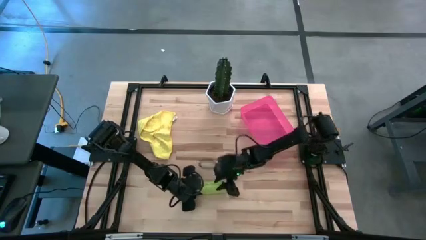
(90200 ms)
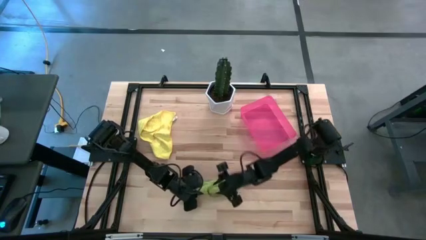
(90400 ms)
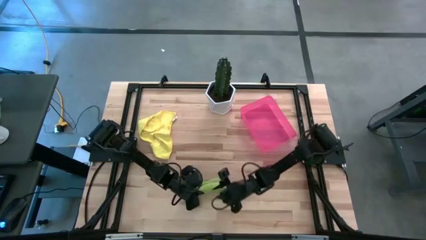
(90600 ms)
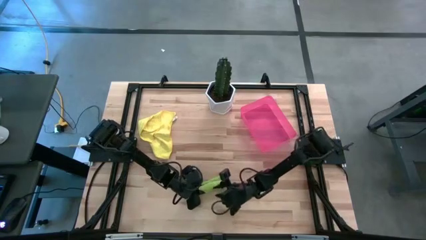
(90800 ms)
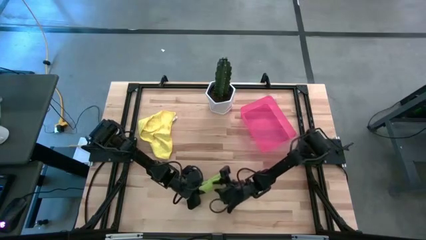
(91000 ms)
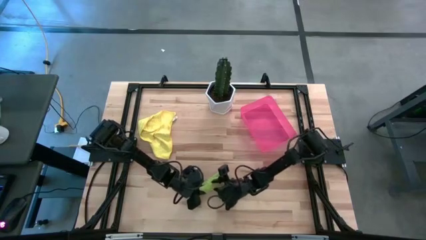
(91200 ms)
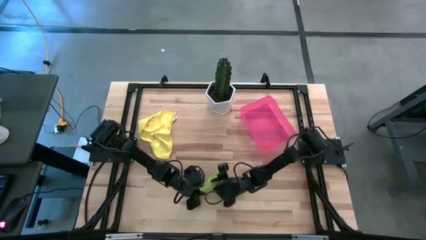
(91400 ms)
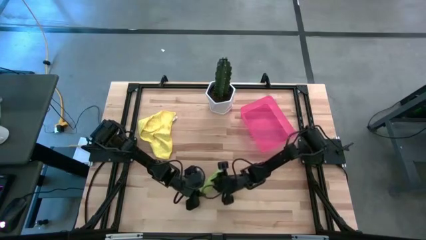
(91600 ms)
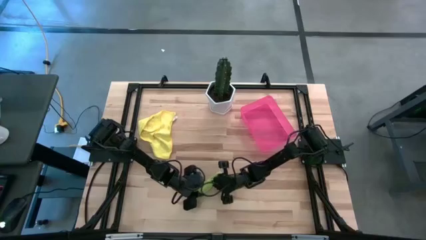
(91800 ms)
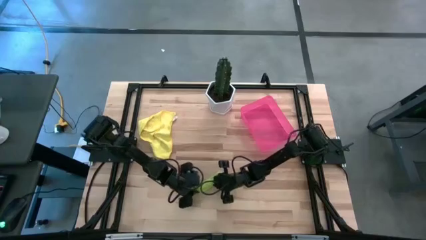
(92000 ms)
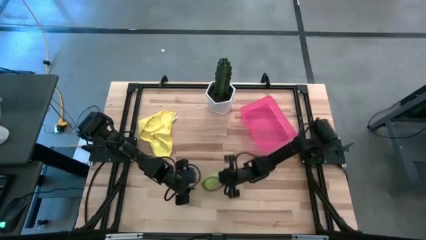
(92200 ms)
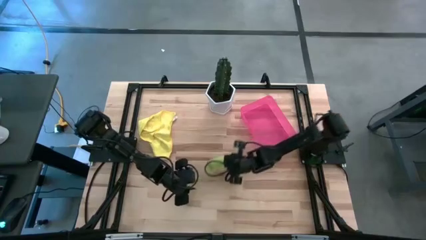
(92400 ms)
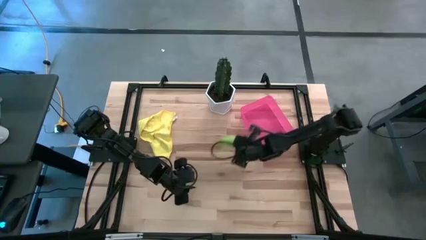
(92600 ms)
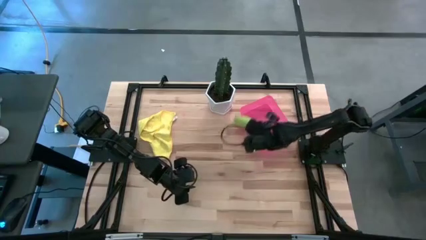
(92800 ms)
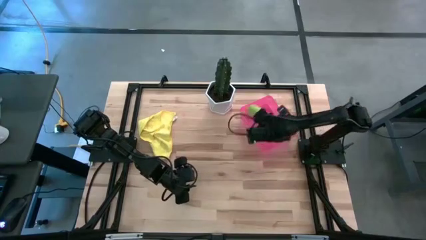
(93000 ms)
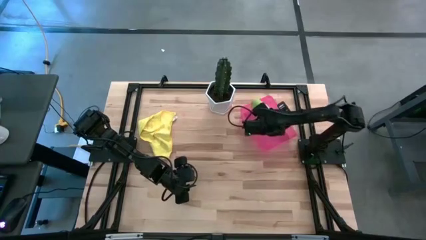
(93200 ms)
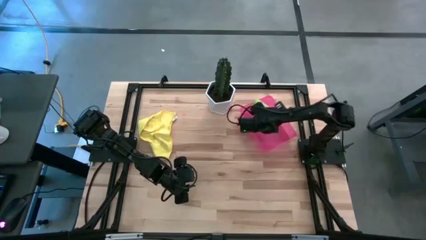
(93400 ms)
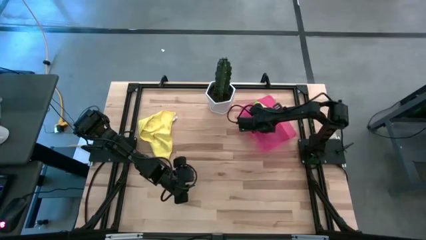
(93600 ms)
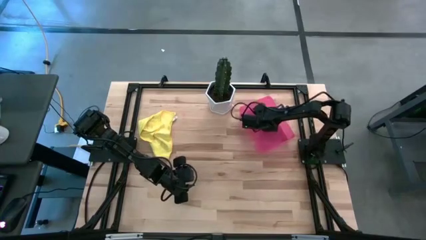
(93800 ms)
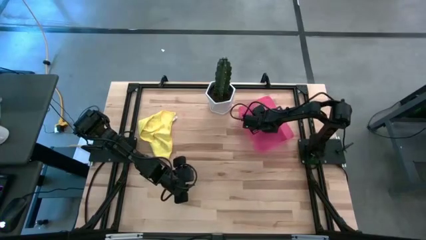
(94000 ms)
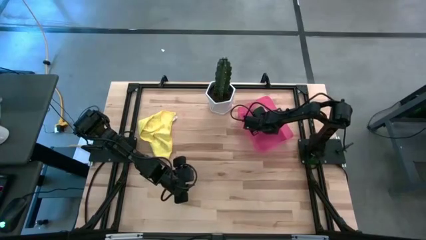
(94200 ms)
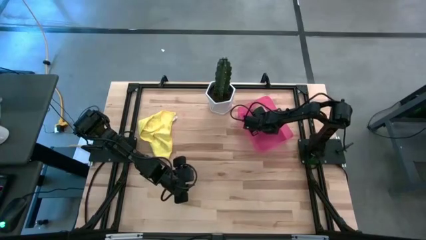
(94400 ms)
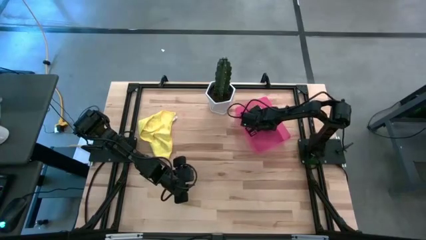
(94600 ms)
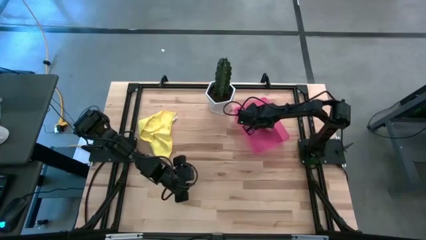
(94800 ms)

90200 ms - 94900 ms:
Task: Roll microfiber towels into tight, uniform cylinder then place into a basket
Put the rolled green towel into the pink bin

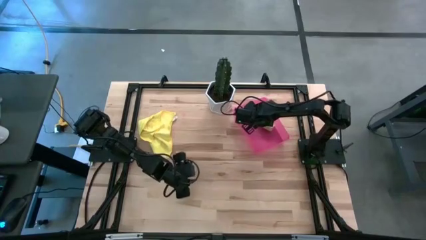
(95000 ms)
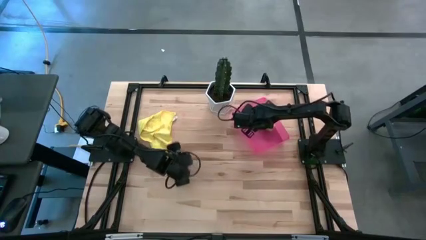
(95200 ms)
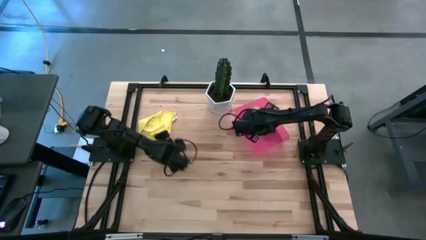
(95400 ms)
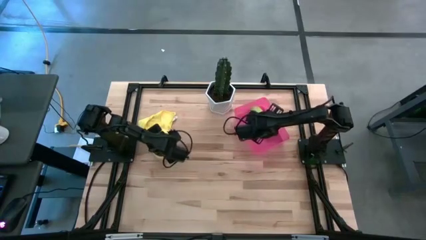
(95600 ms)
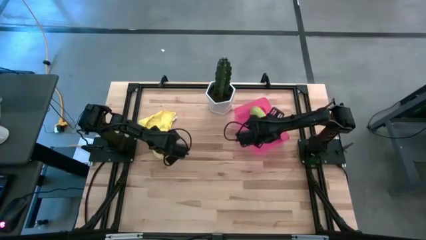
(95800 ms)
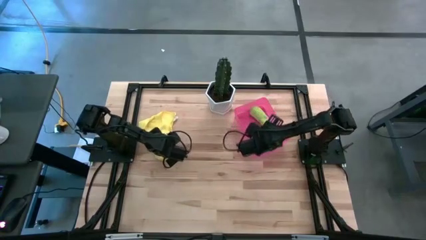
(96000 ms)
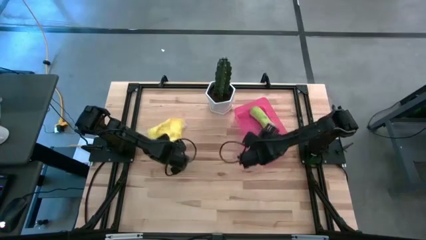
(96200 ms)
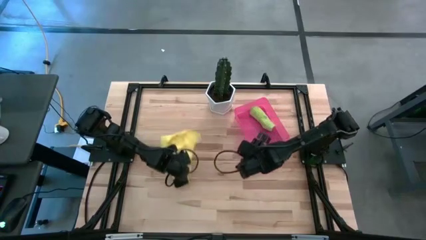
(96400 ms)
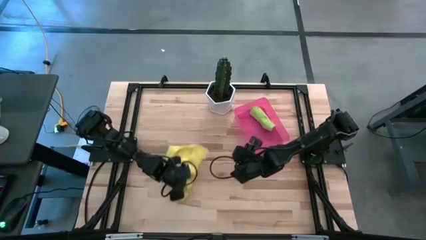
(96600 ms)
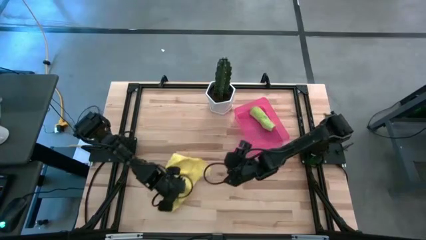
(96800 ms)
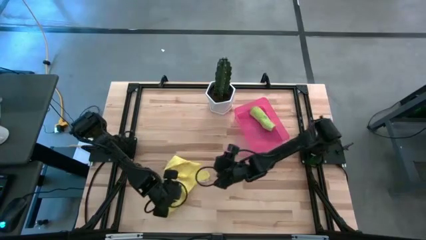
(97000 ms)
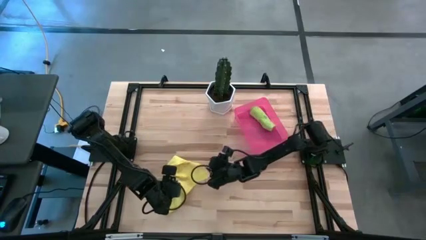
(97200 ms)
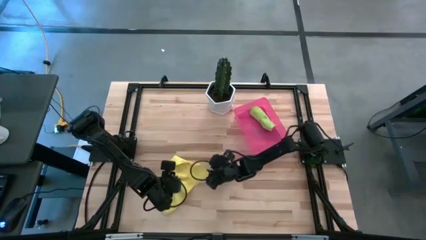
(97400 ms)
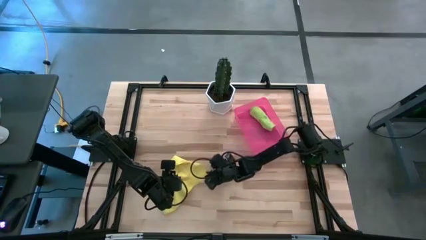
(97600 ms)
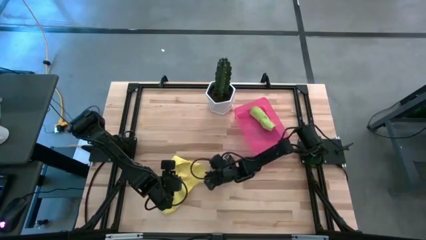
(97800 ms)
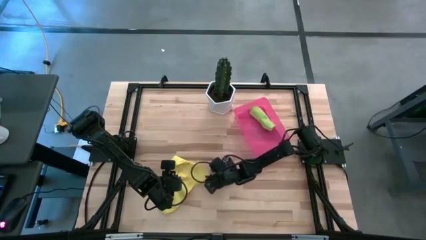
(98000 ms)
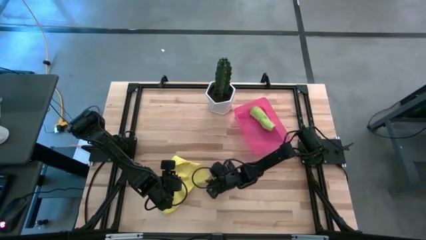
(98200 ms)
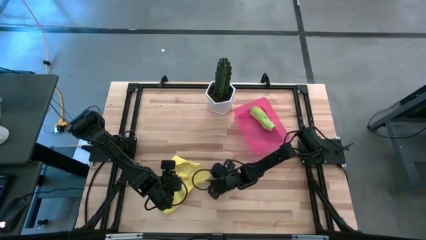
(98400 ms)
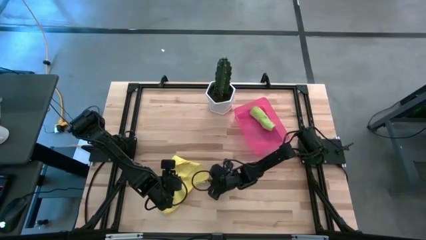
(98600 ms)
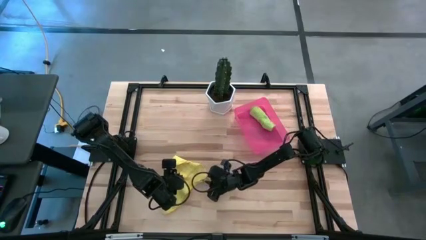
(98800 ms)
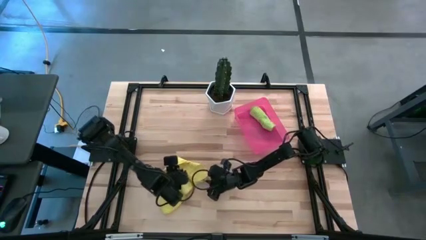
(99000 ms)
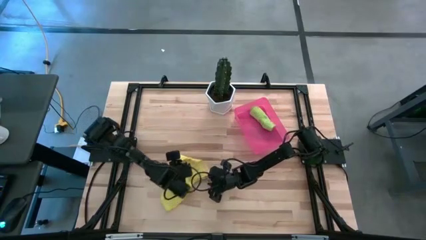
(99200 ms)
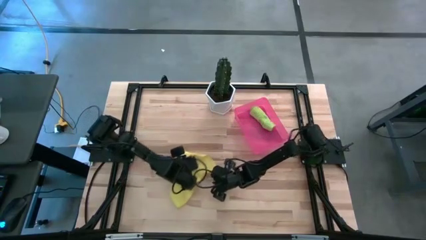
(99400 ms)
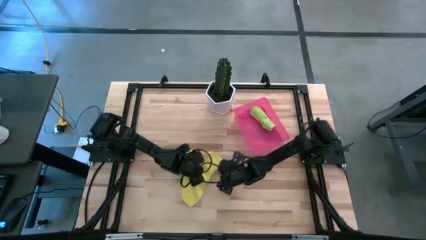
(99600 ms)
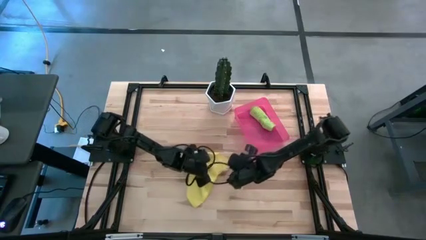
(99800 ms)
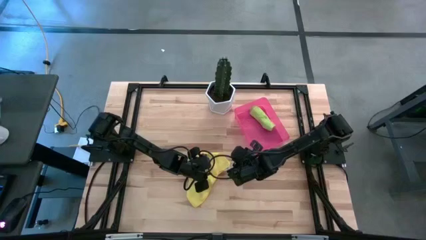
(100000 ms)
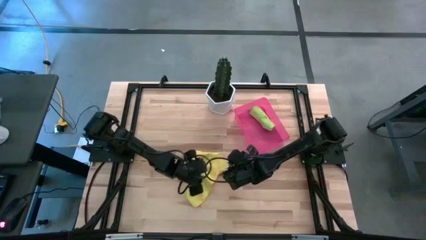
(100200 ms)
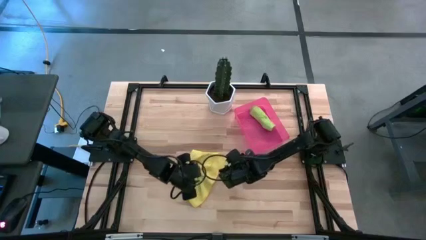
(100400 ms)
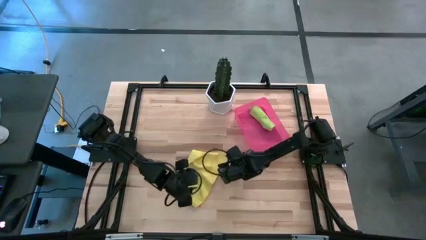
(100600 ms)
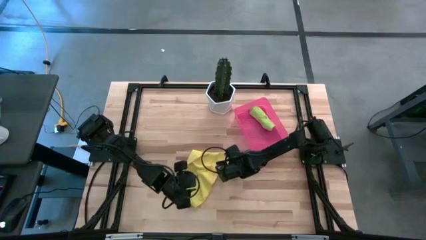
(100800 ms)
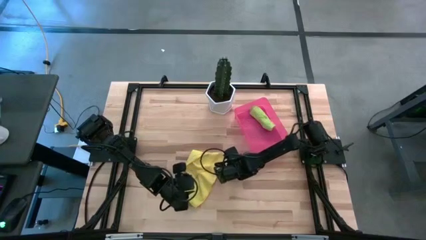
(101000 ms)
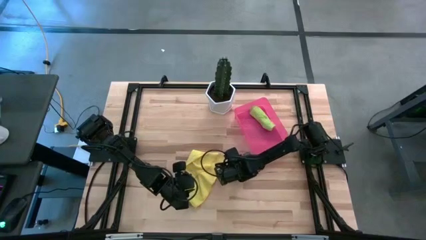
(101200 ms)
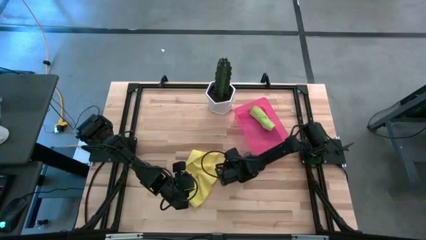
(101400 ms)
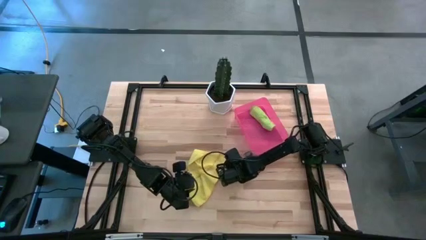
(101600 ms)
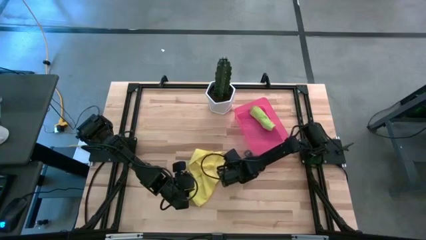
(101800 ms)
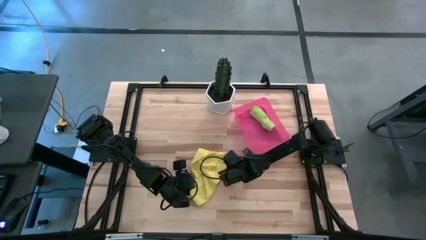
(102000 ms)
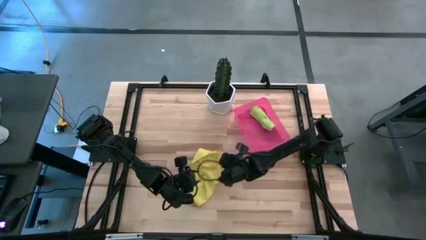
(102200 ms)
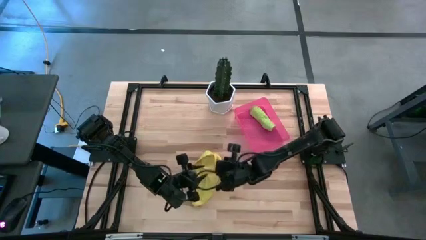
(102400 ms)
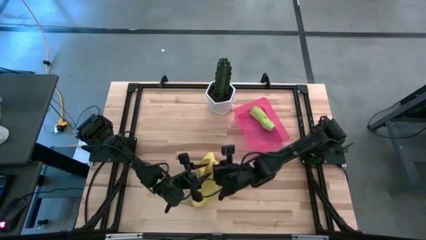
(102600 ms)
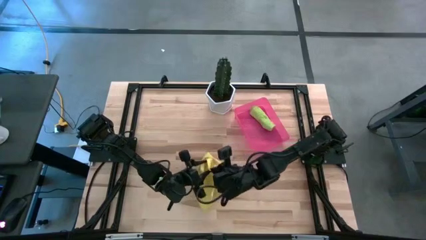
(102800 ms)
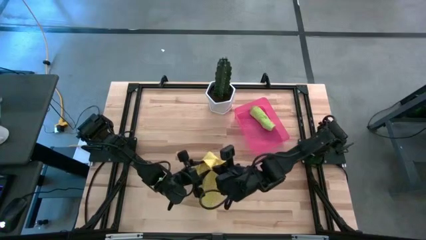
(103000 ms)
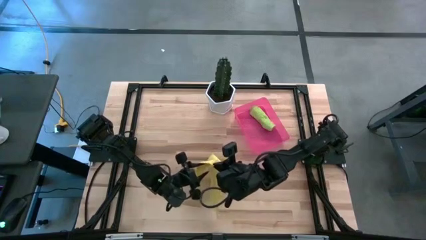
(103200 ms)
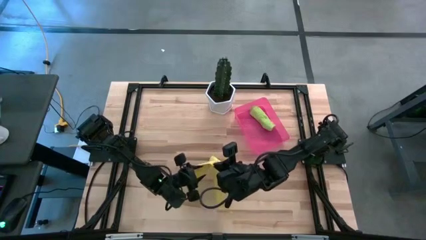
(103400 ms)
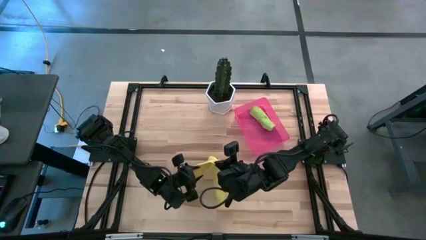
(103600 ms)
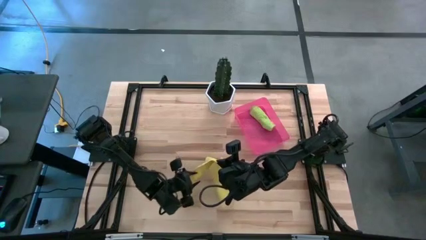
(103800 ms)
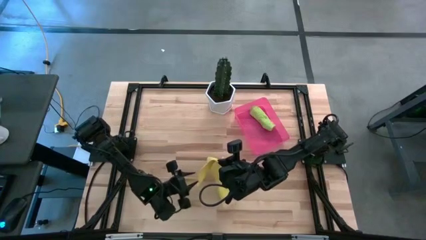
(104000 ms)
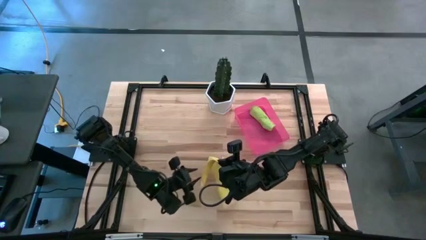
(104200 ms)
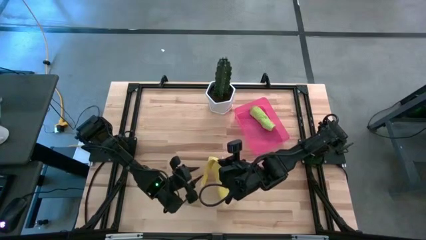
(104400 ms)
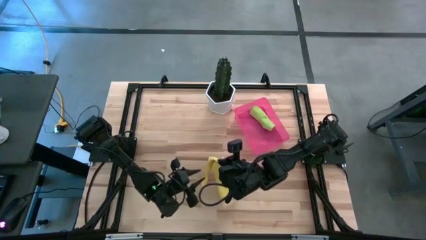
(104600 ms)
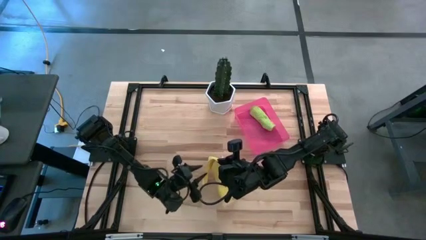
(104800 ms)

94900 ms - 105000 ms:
Fold the yellow towel
